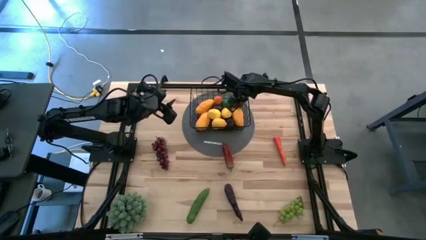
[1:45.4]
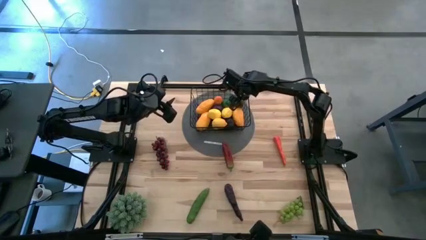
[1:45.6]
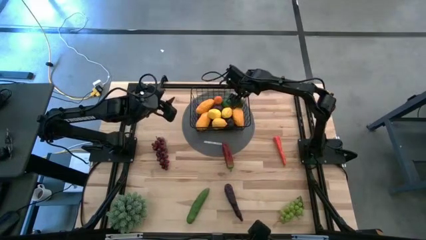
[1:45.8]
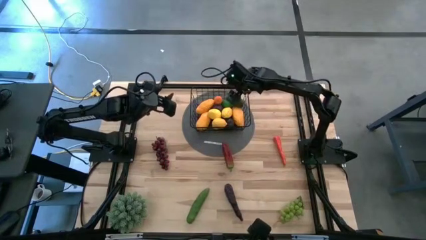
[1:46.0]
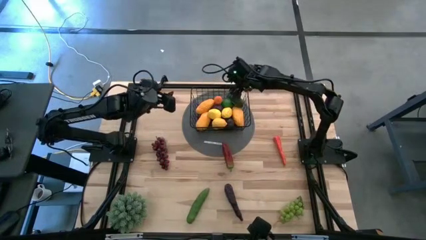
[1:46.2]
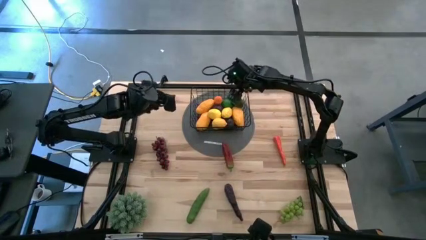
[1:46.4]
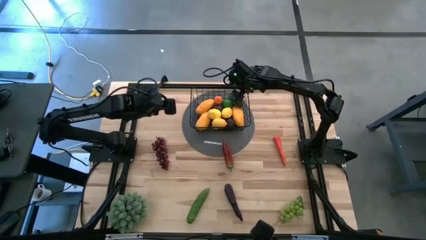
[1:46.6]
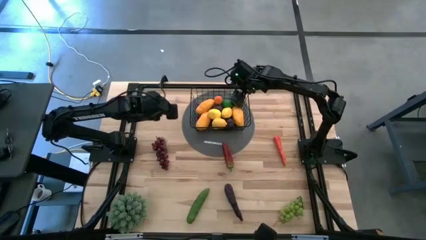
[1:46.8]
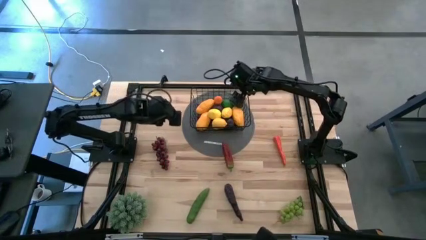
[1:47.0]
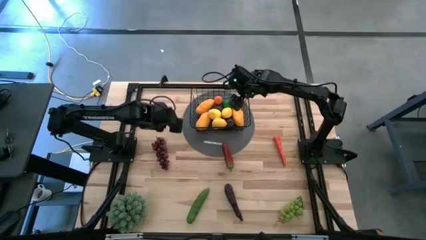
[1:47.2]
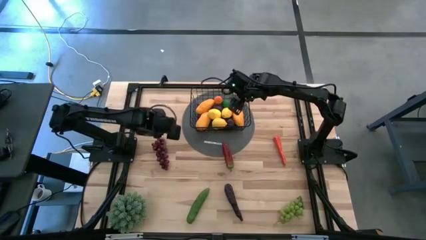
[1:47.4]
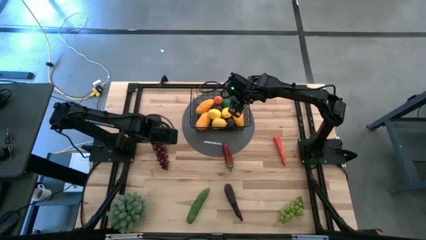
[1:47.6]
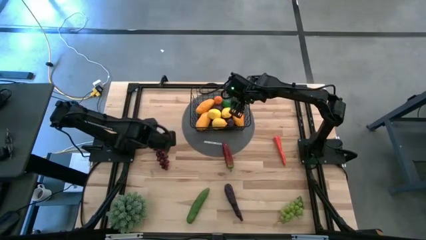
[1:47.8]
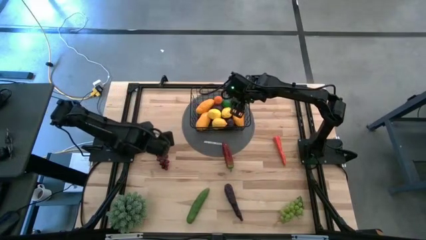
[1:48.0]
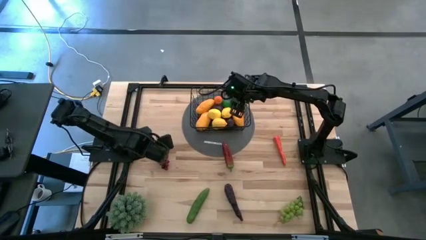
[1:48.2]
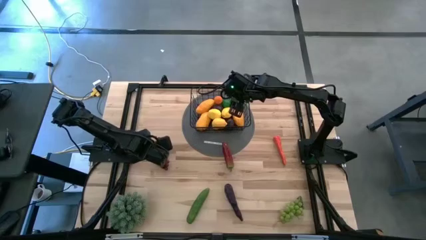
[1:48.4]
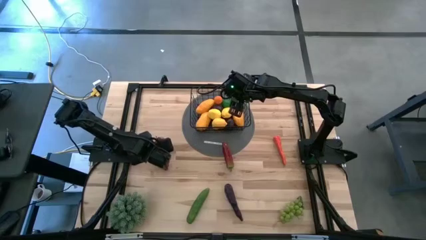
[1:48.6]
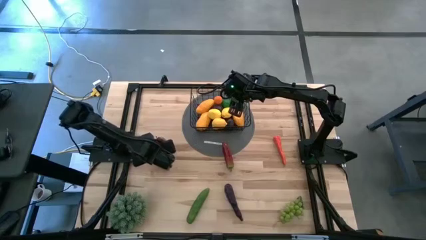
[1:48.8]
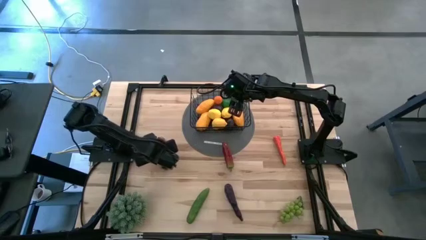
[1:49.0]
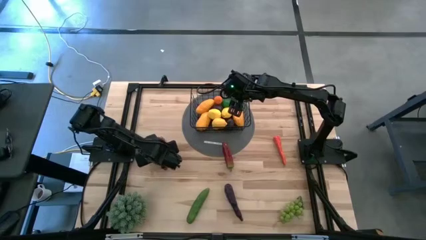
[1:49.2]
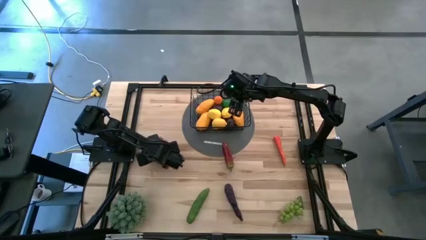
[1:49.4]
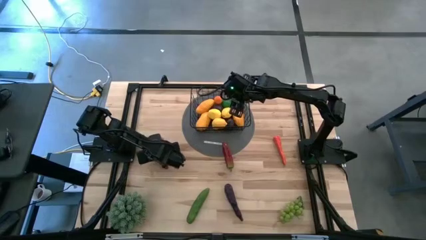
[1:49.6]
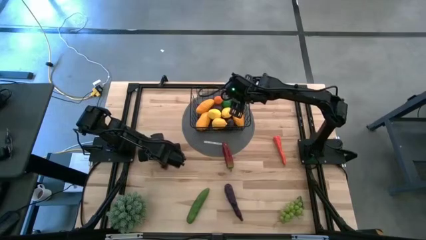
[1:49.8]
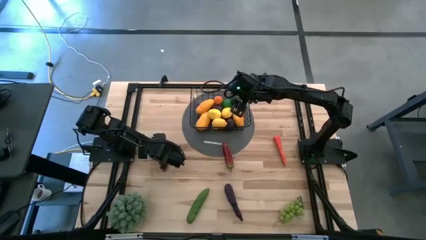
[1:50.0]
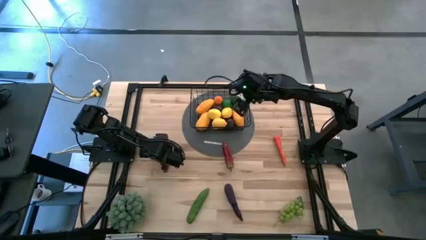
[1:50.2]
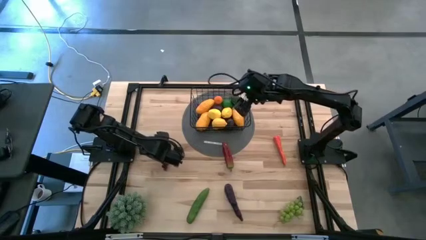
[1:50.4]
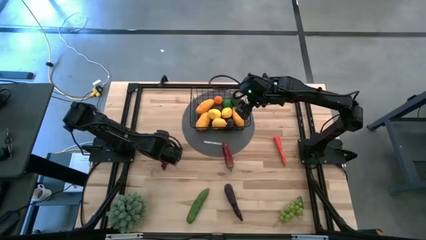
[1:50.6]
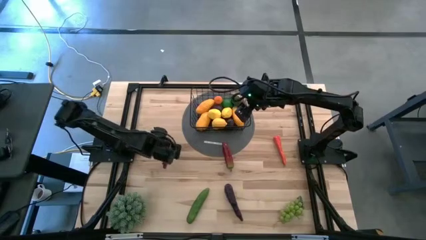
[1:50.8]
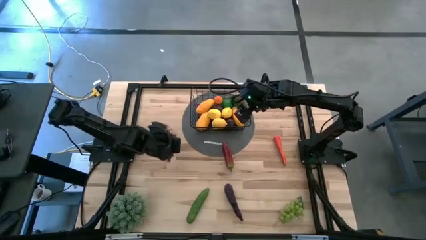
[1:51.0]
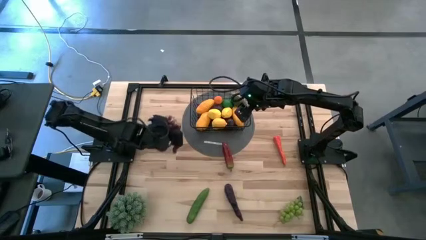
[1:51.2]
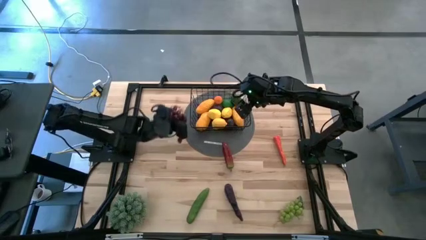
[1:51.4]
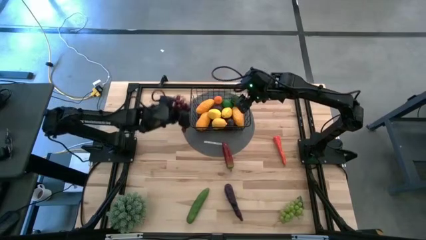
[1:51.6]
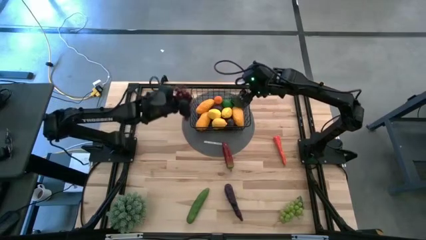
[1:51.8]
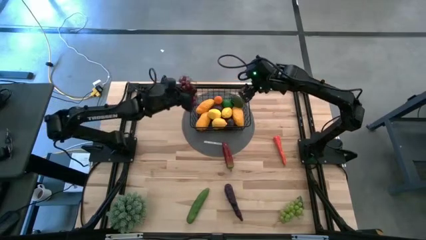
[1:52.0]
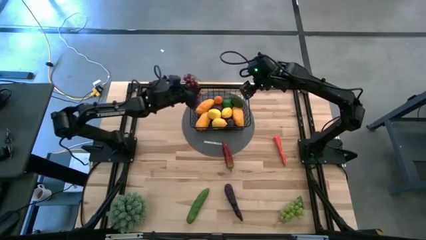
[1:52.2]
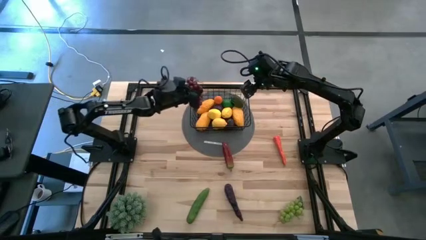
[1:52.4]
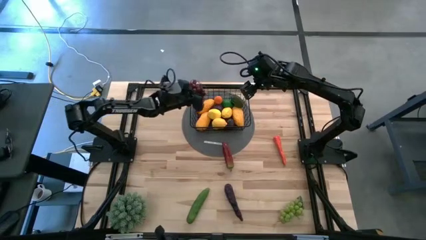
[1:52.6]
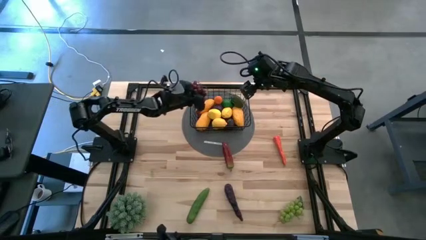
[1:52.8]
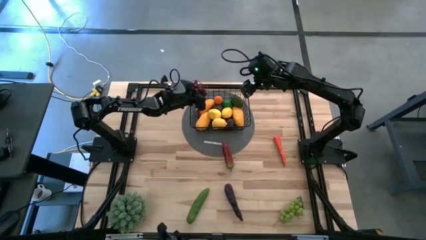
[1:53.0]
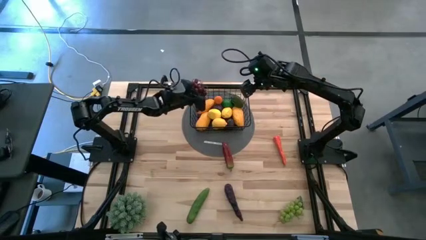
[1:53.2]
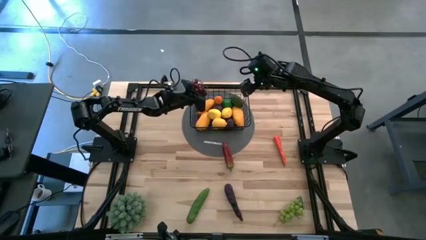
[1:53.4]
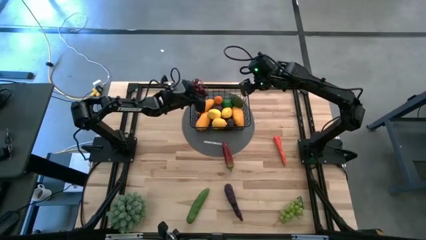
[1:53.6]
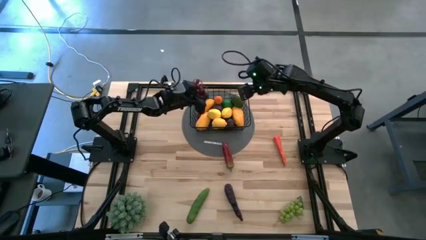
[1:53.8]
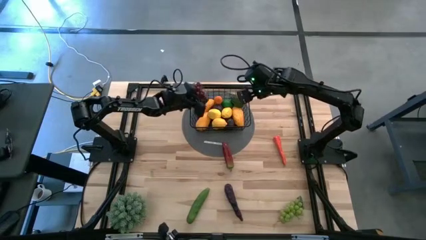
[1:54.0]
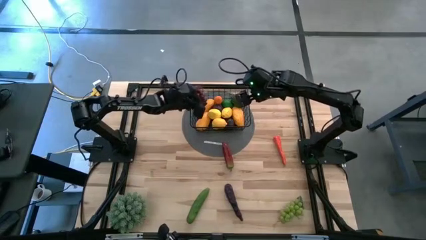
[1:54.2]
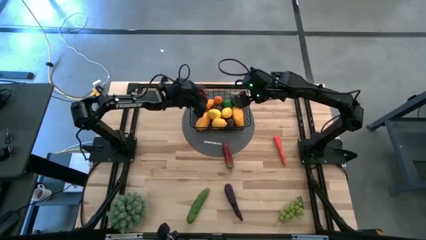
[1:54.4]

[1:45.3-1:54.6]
Task: Build produce basket
Put the purple grapes into the black wire basket

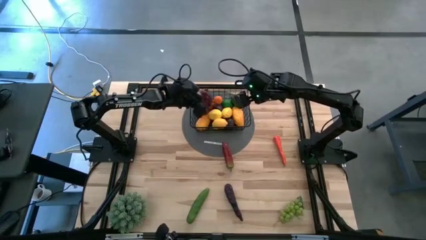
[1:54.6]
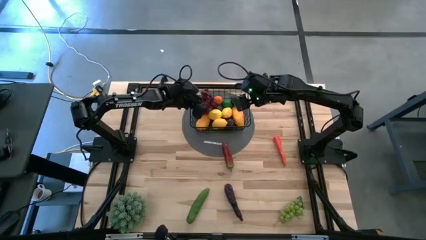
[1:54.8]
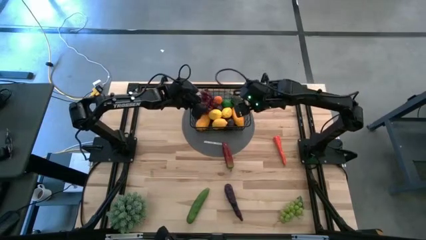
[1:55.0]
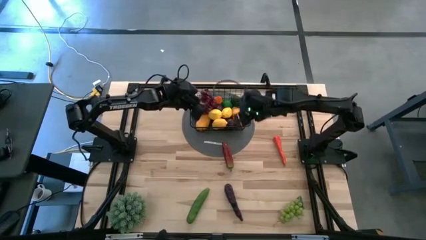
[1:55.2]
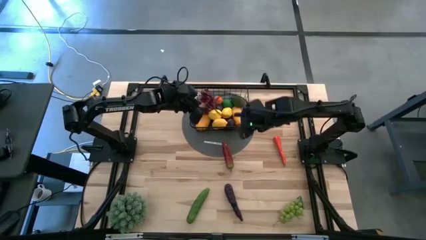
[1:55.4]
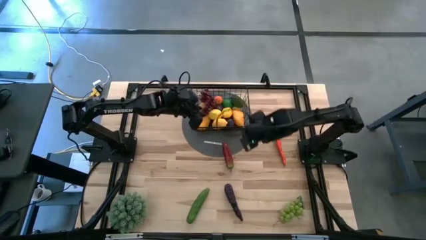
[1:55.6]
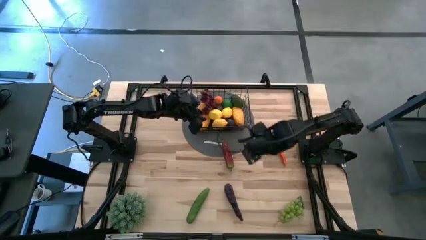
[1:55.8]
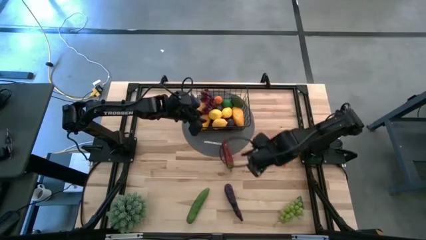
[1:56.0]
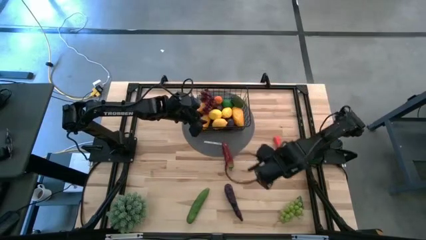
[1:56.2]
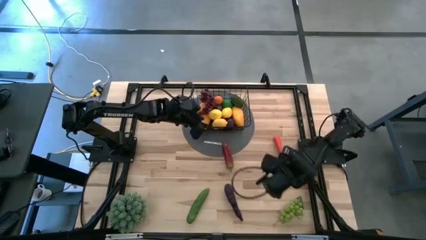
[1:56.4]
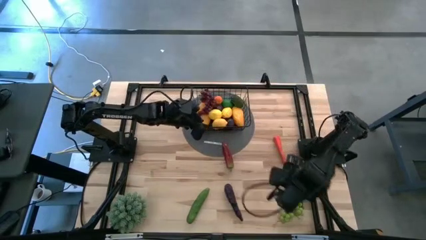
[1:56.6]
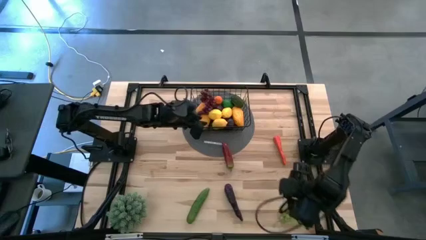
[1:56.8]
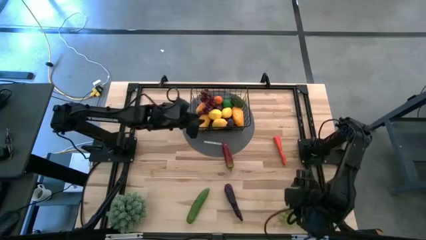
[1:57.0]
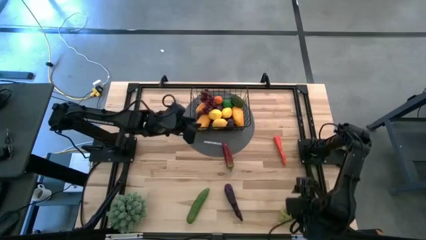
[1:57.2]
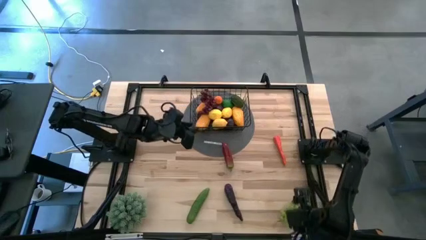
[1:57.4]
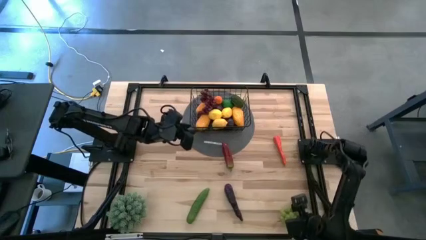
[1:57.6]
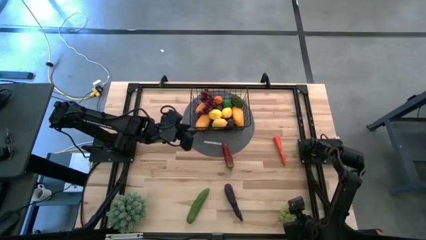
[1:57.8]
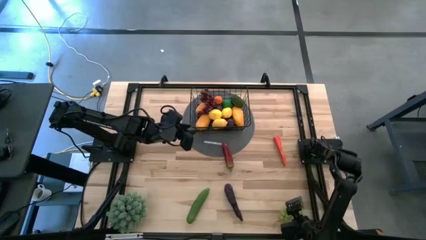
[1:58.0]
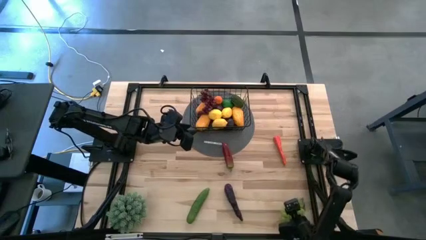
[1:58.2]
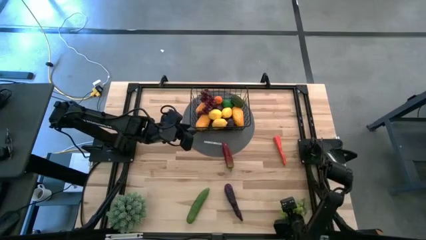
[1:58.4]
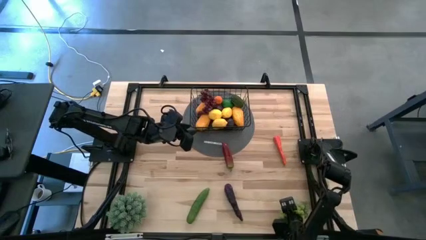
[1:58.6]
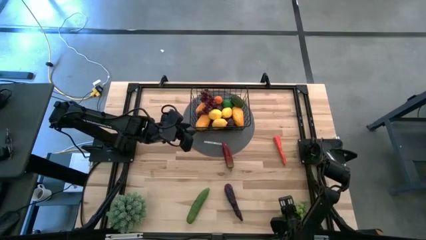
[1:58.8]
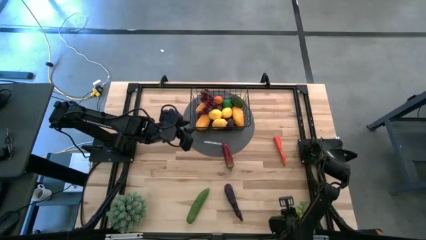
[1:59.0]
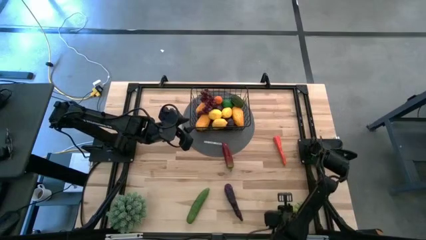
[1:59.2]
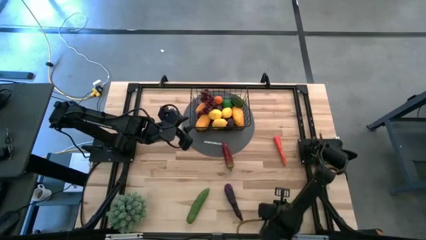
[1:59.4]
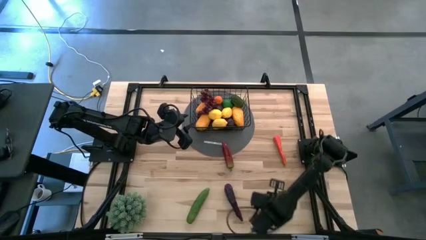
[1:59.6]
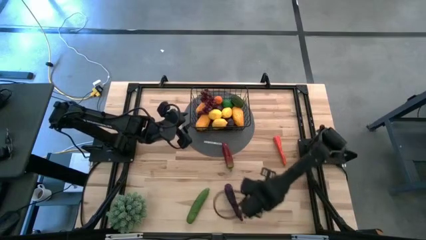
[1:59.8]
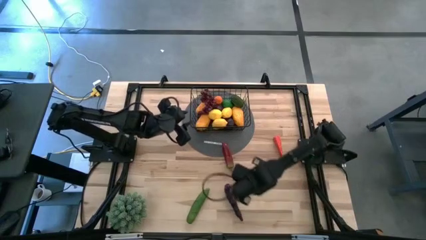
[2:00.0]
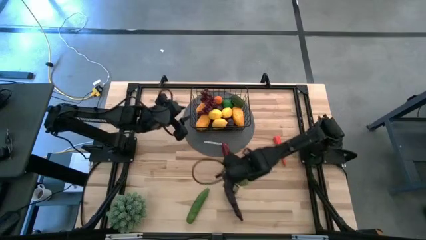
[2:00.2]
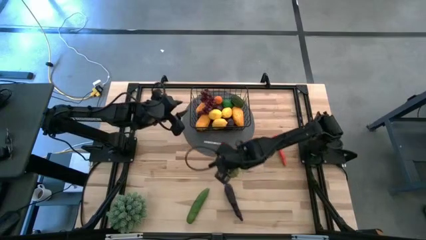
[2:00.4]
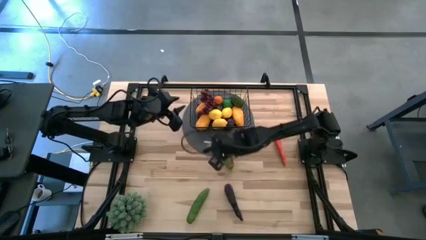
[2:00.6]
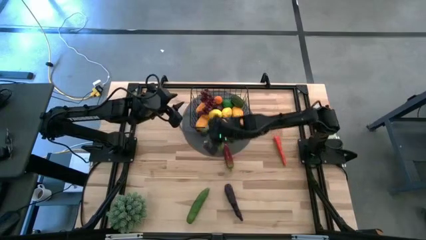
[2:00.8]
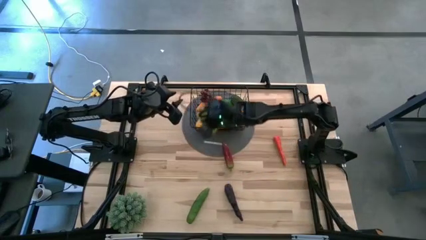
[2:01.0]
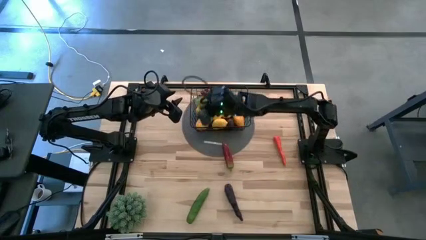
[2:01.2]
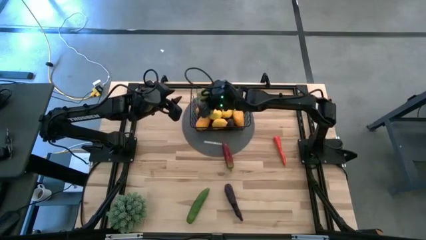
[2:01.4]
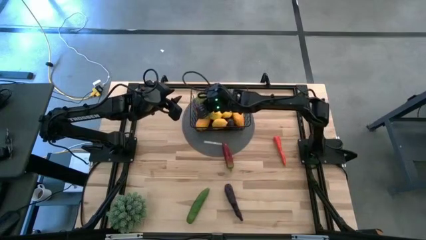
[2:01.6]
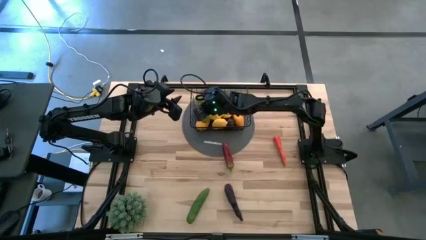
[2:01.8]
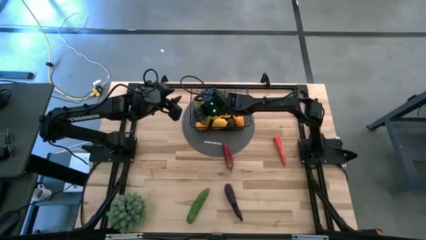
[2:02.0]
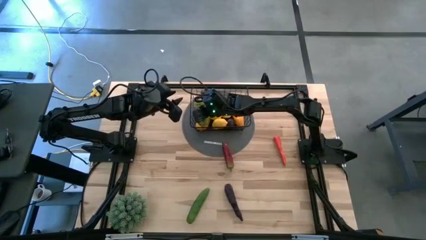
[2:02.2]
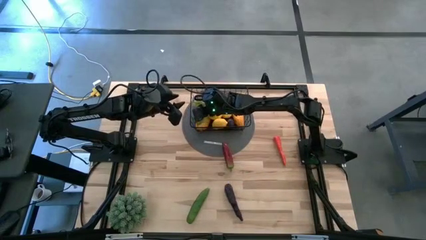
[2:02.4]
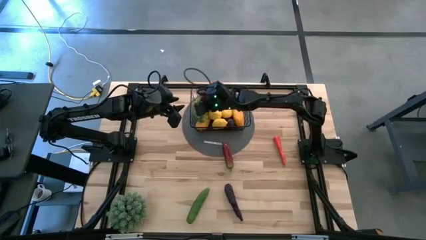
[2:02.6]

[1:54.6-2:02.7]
Put the green grapes into the black wire basket
